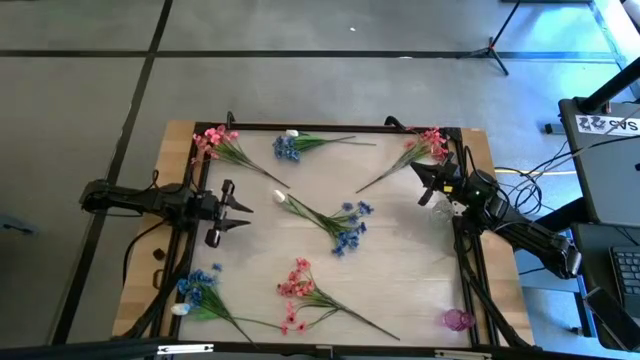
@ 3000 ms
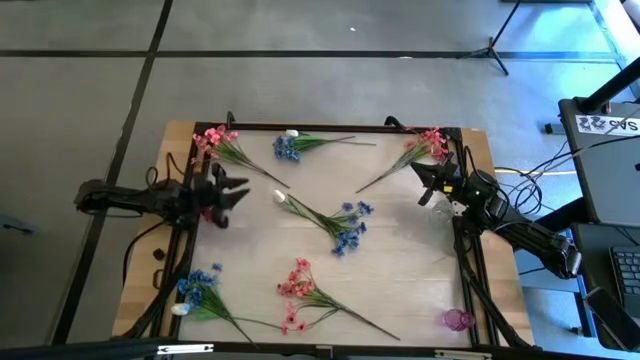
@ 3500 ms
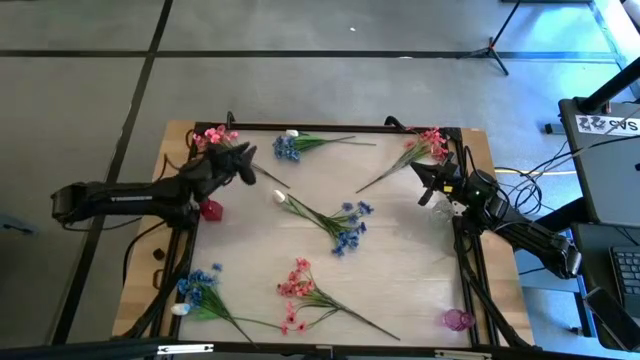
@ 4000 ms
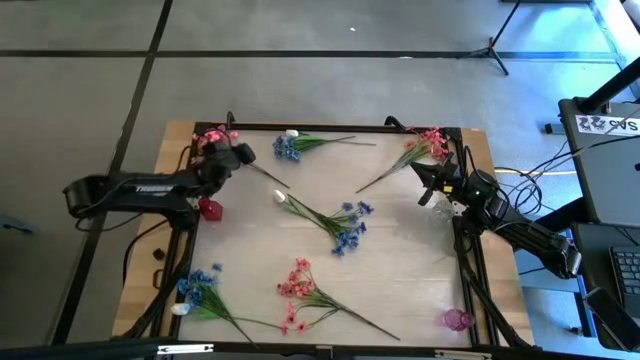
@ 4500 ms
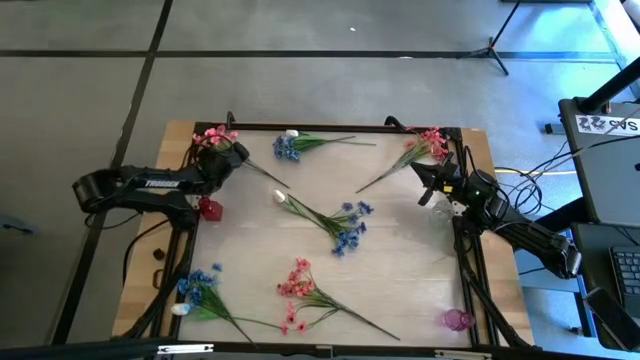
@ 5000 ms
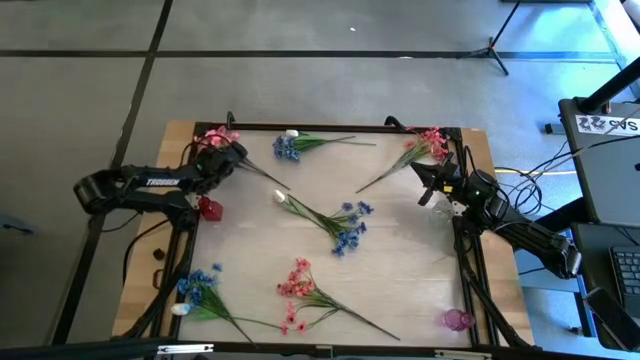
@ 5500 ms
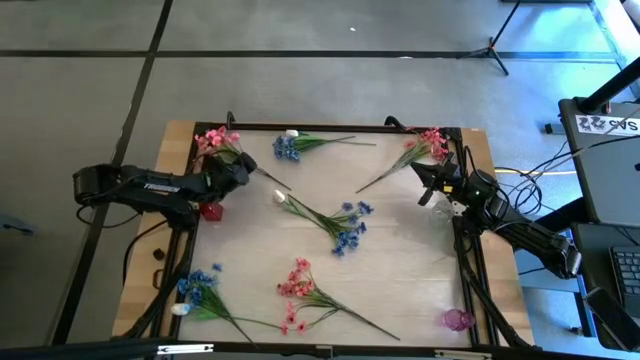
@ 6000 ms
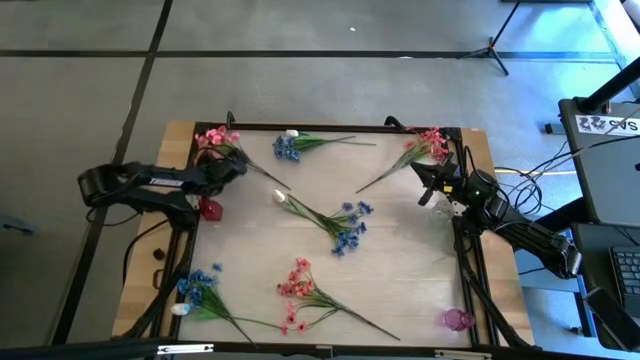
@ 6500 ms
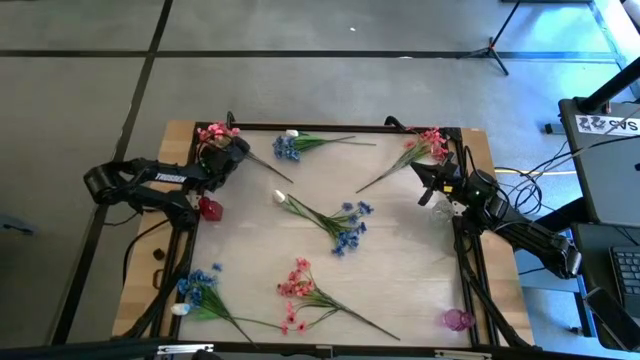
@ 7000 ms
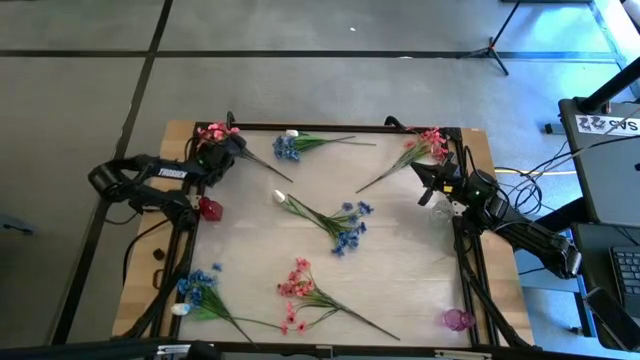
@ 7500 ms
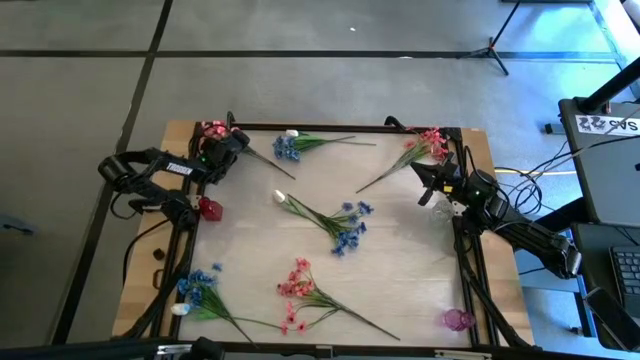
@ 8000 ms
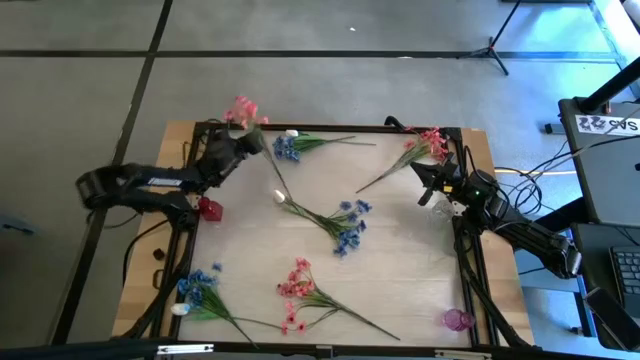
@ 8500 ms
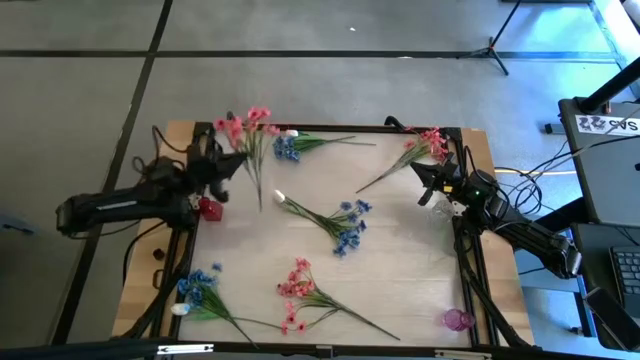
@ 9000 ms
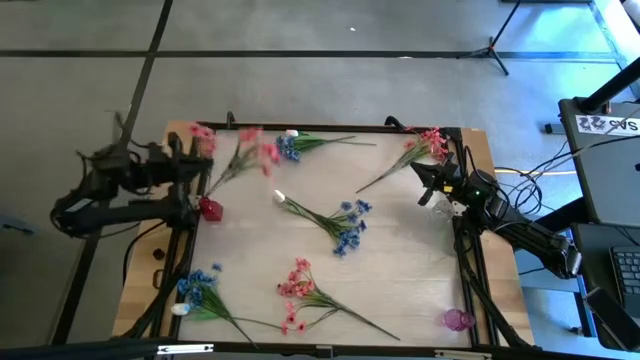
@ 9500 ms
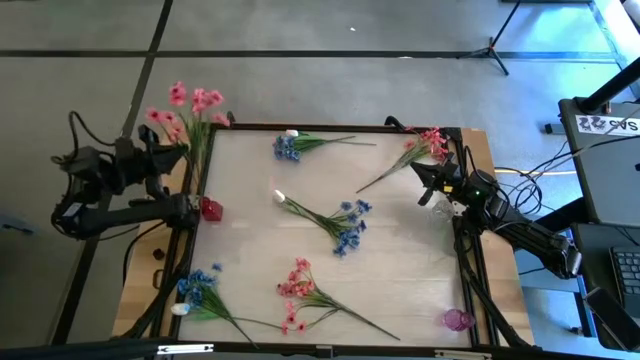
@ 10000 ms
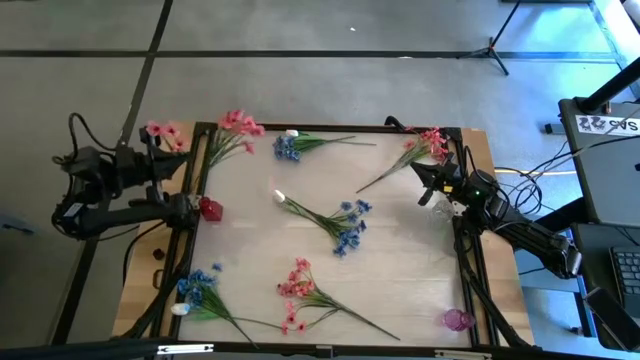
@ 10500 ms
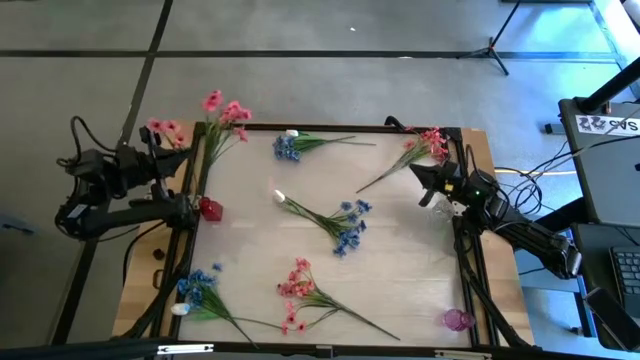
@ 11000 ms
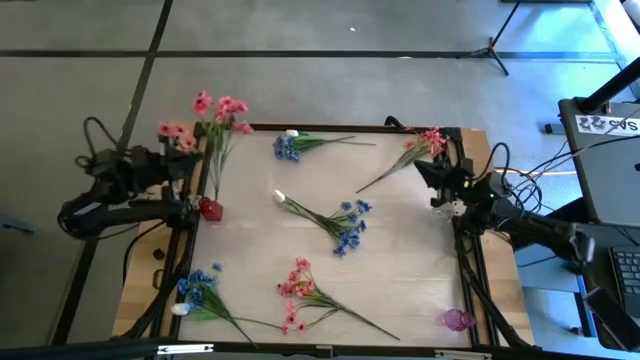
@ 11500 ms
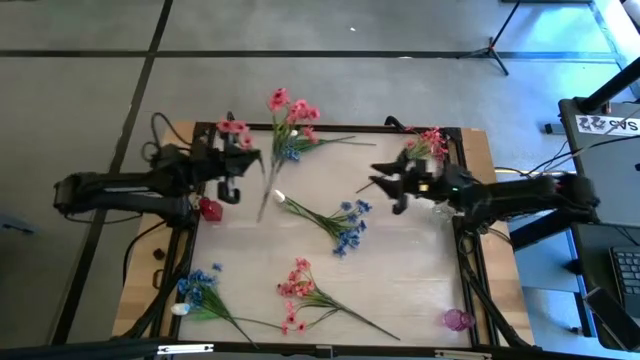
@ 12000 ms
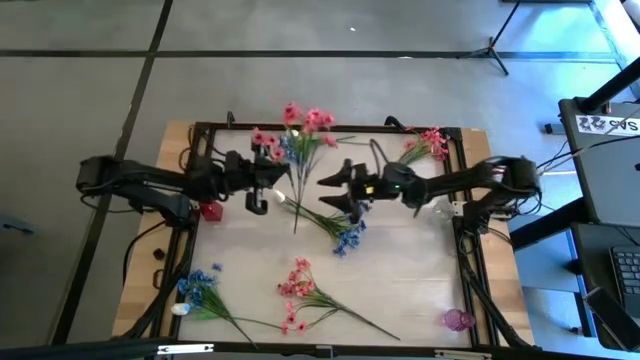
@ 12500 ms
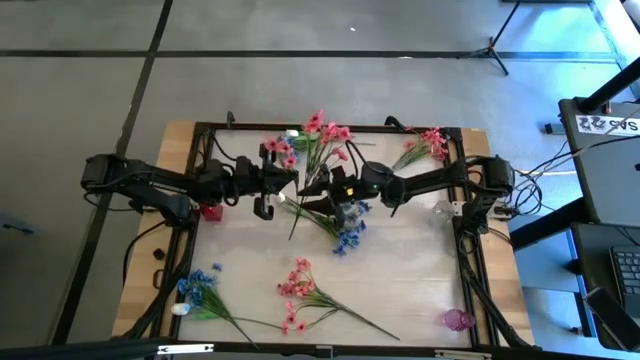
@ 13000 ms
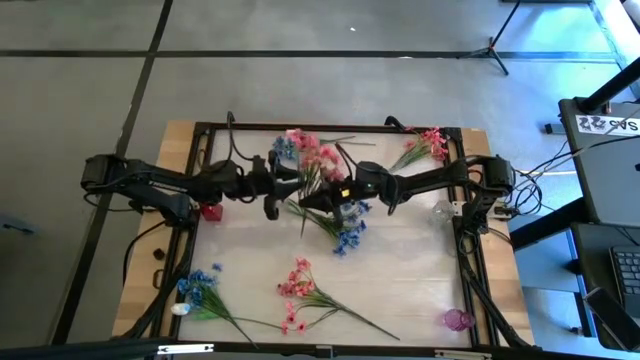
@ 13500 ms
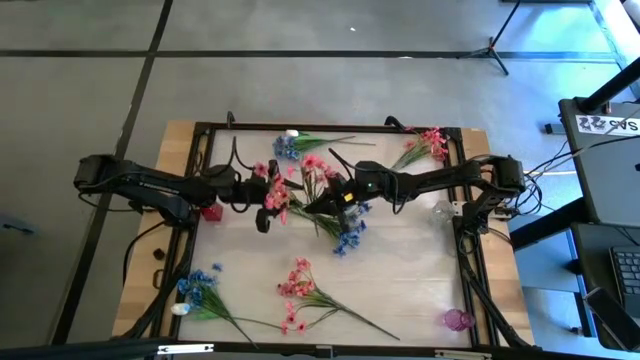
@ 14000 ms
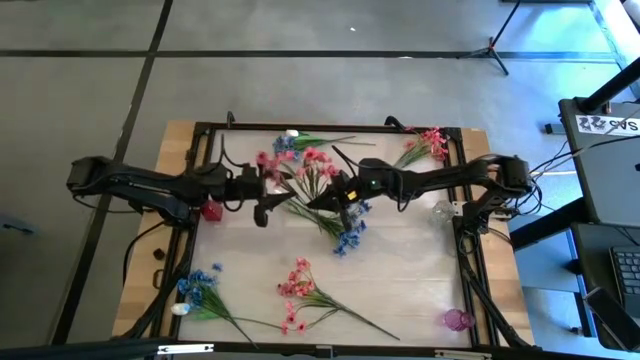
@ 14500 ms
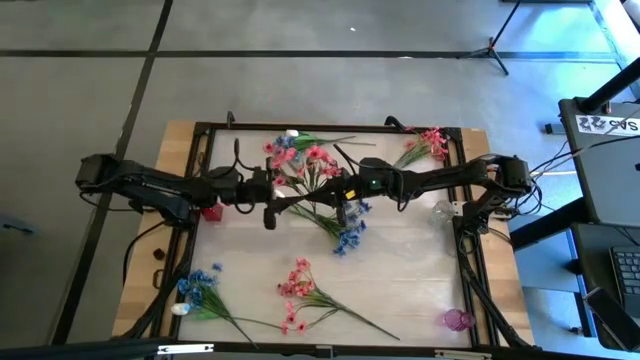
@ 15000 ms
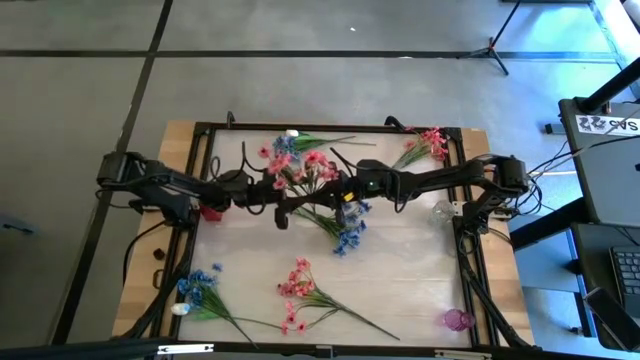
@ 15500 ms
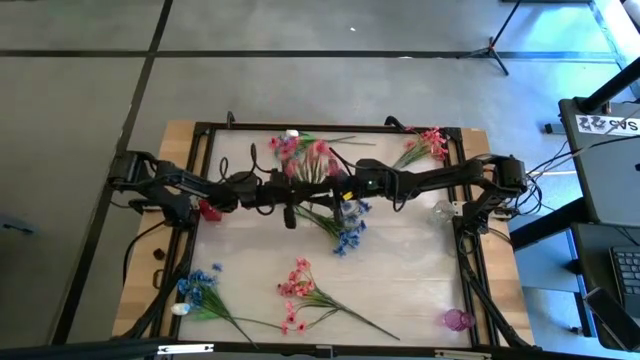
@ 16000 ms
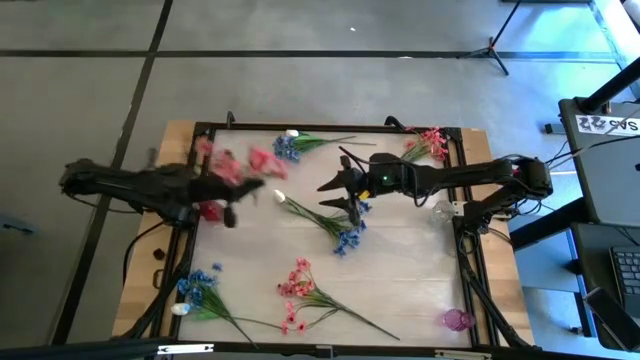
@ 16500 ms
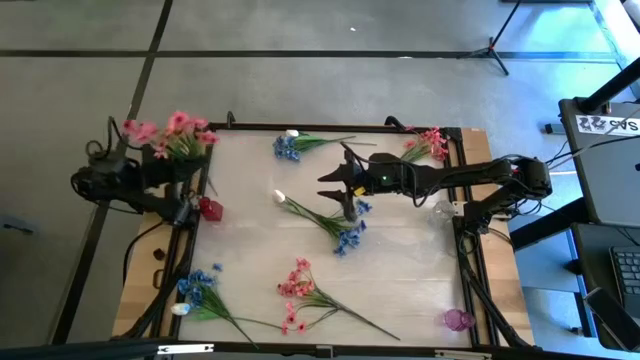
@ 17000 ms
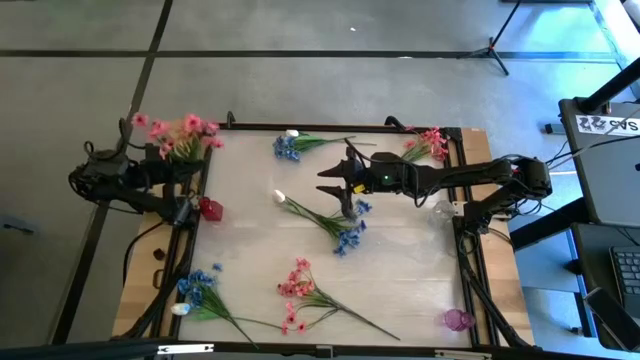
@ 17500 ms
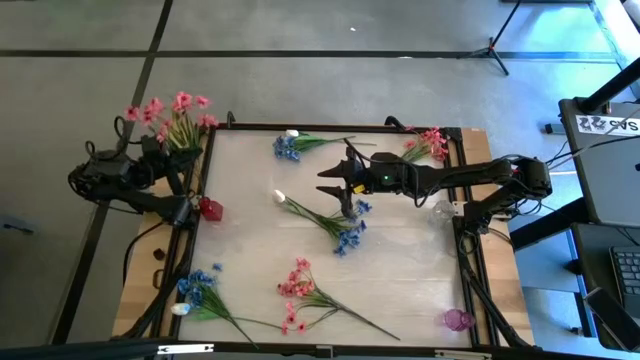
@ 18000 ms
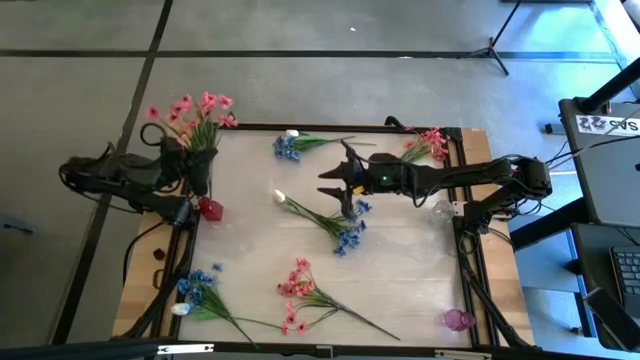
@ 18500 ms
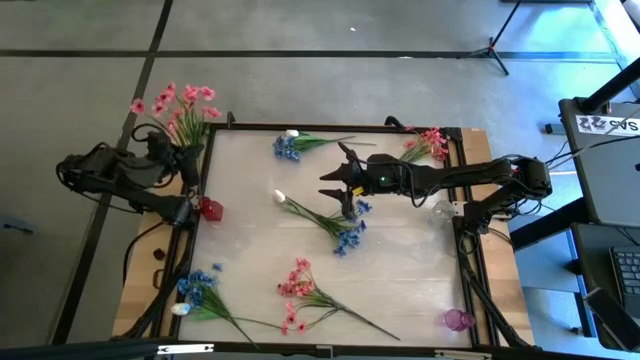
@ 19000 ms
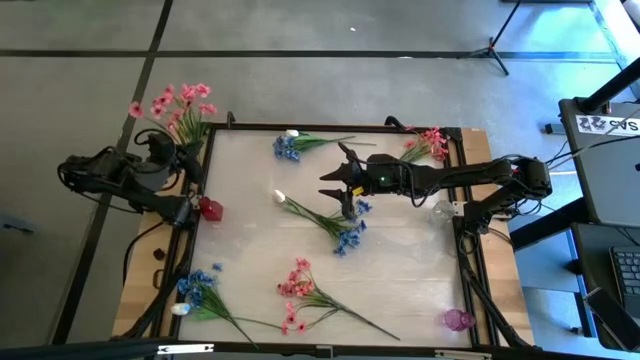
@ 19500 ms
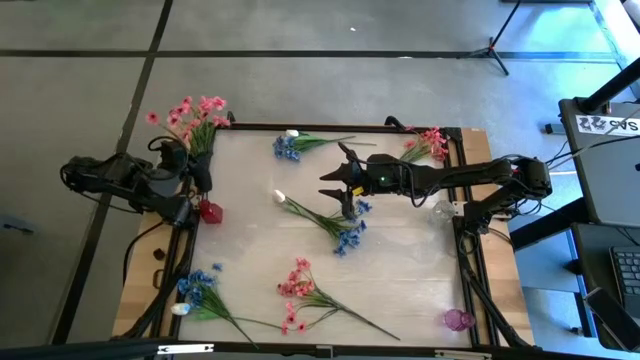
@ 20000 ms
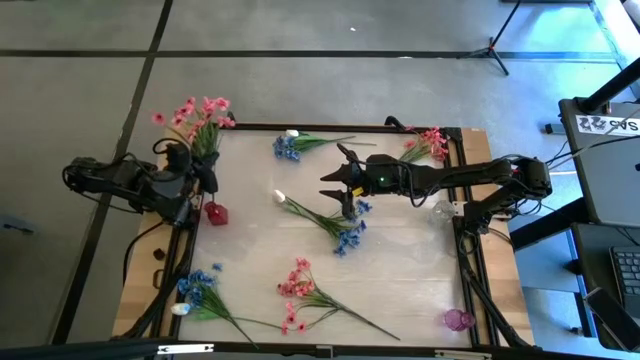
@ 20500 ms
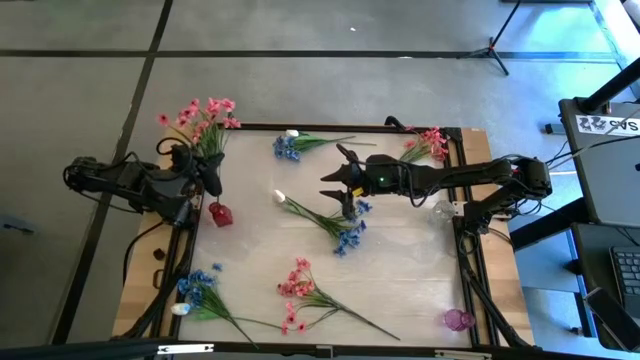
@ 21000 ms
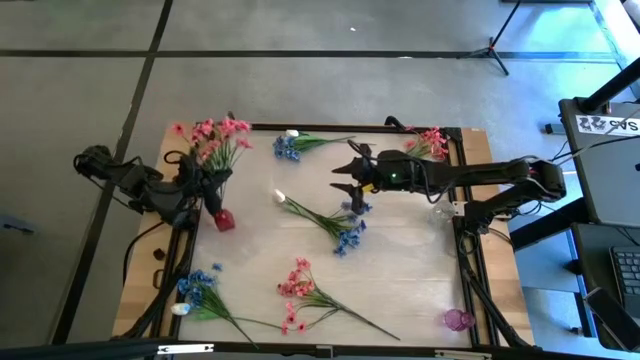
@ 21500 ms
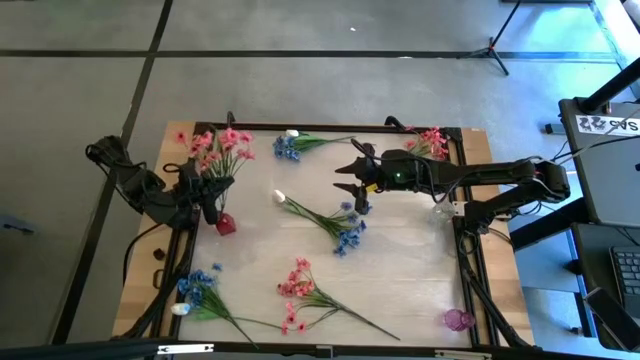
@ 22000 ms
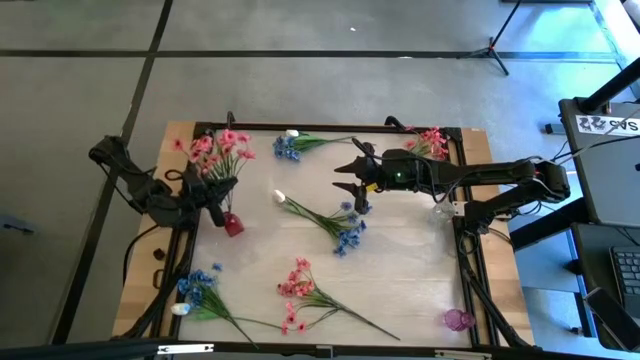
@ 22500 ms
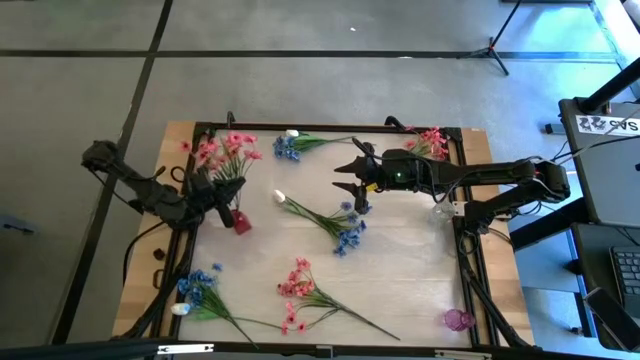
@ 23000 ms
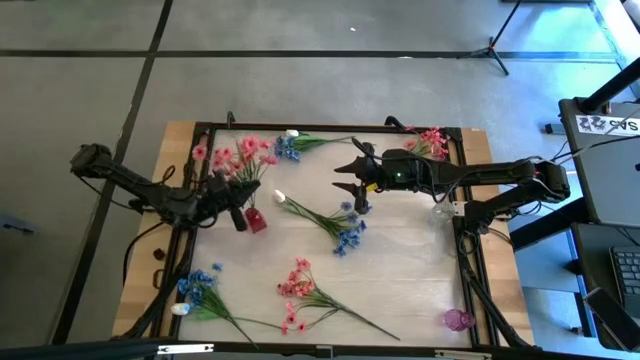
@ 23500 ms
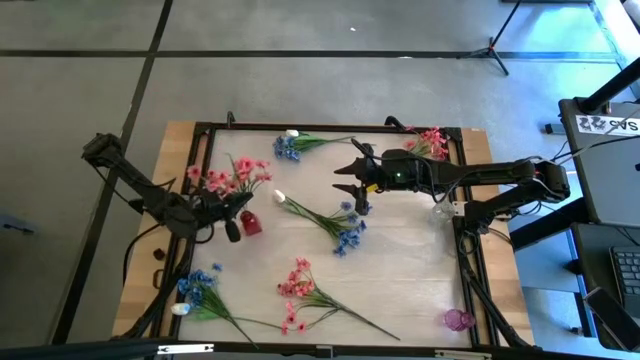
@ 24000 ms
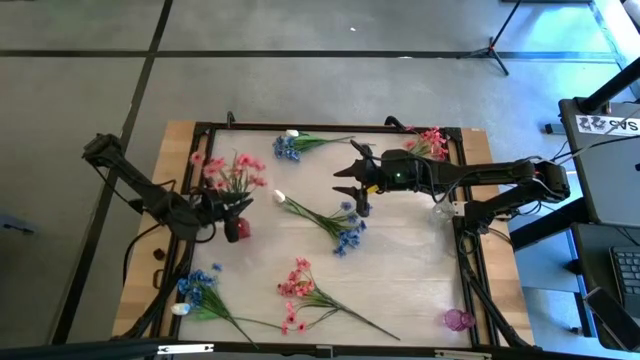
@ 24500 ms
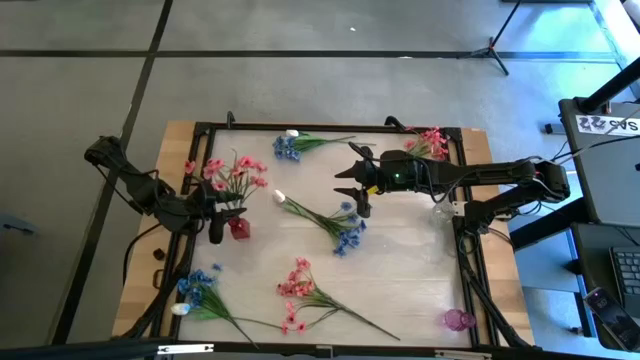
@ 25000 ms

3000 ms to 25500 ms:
Task: Sort flowers into vase by color
Put the top left pink flowers into the red vase
